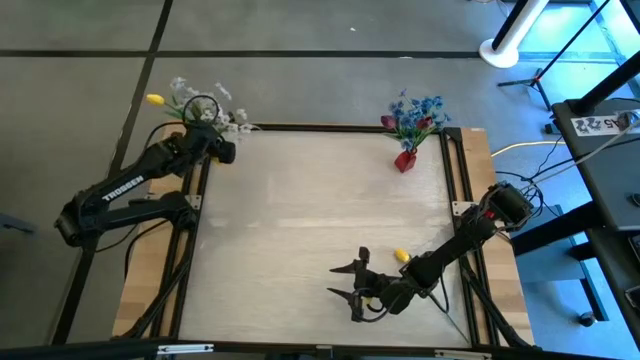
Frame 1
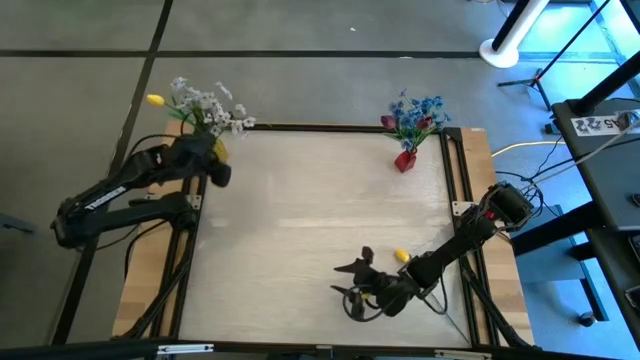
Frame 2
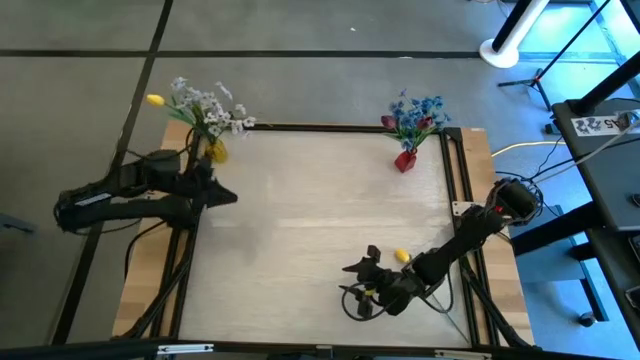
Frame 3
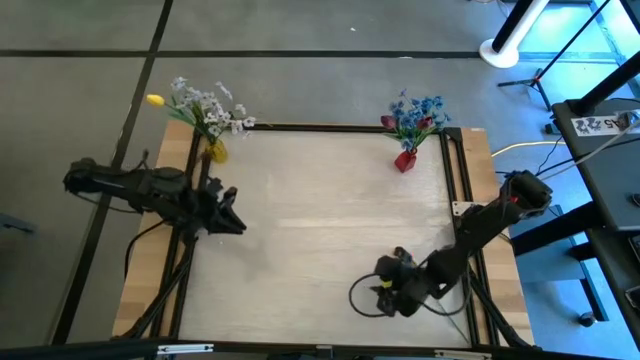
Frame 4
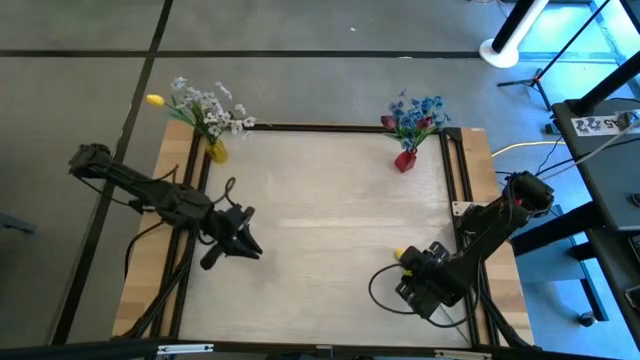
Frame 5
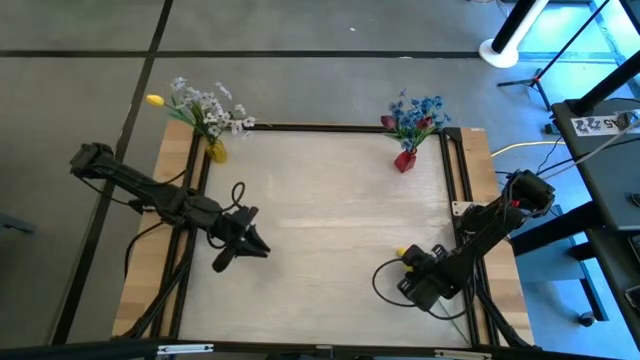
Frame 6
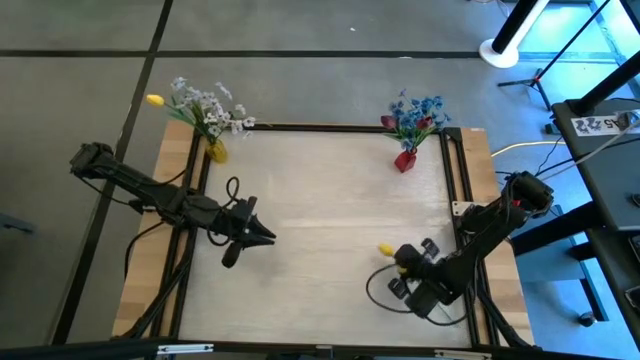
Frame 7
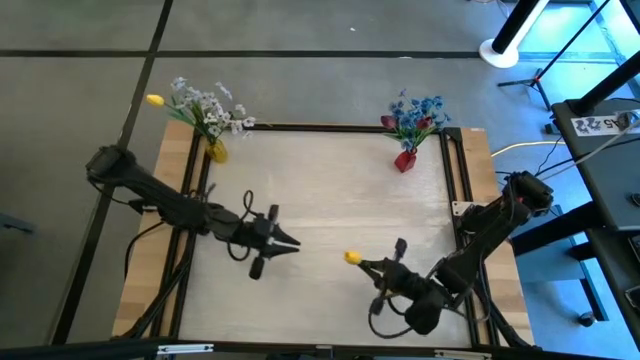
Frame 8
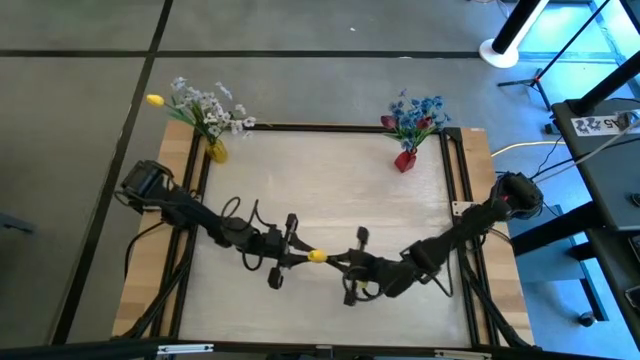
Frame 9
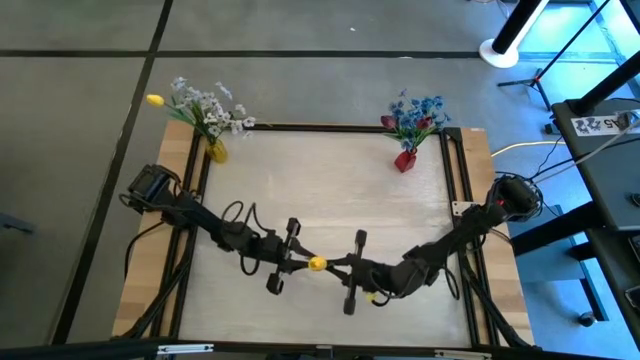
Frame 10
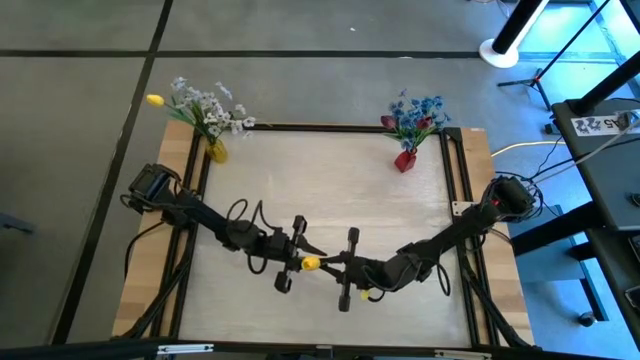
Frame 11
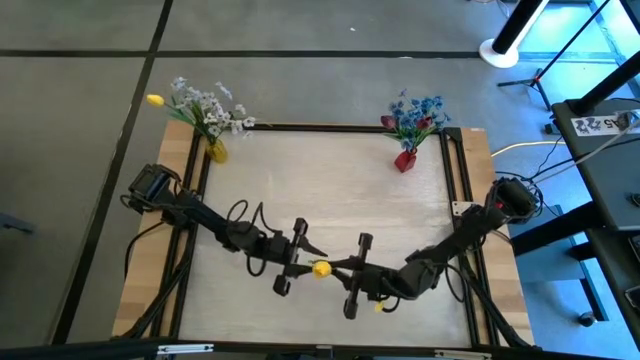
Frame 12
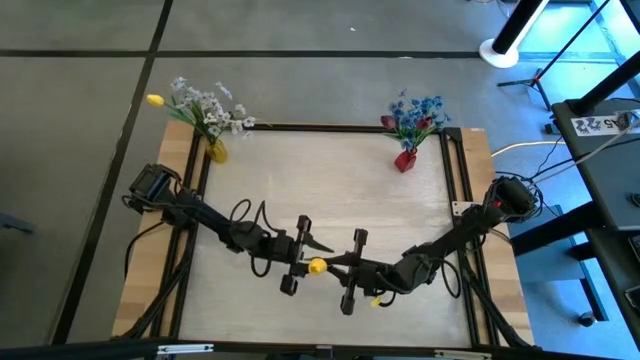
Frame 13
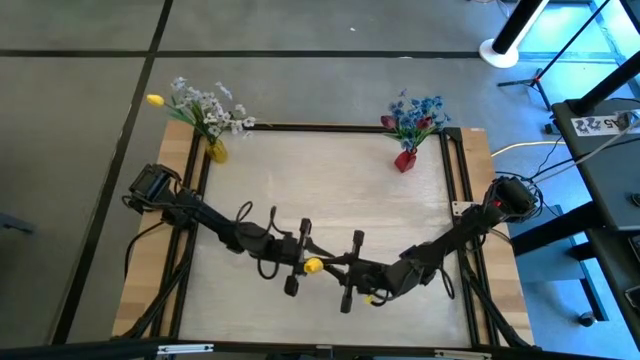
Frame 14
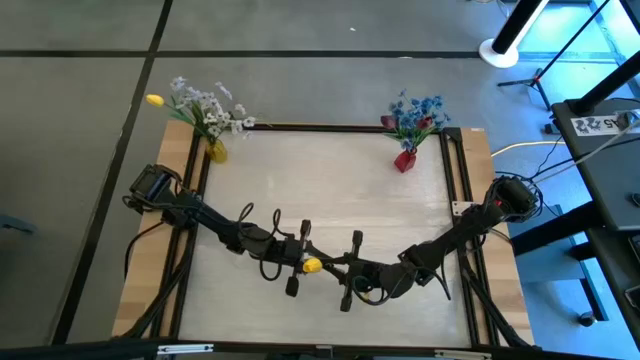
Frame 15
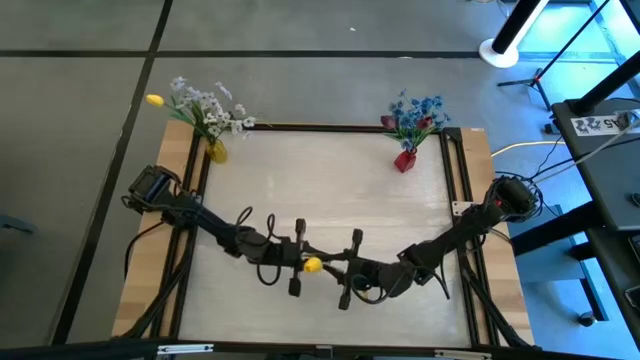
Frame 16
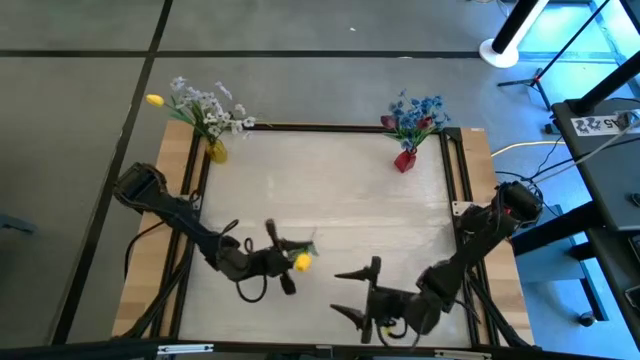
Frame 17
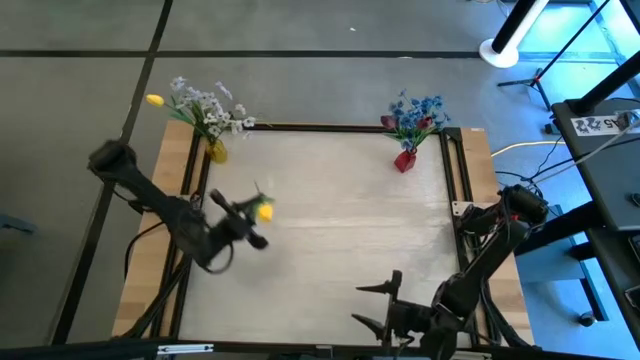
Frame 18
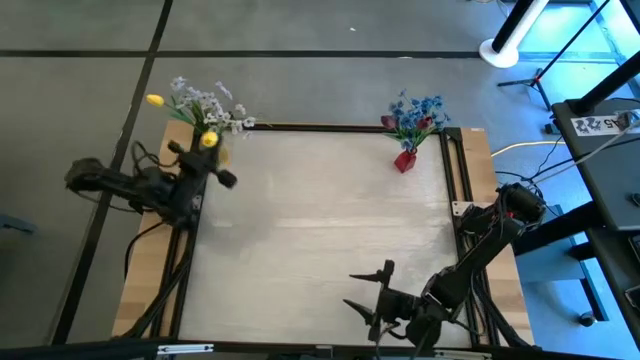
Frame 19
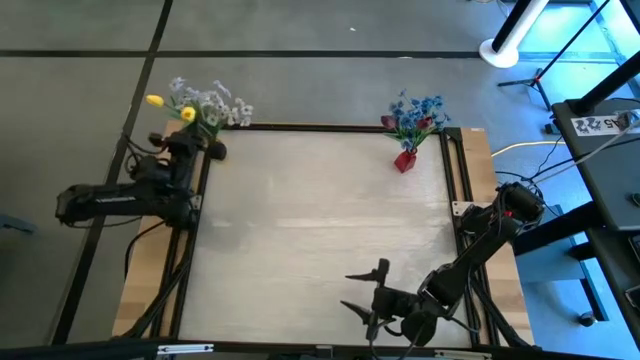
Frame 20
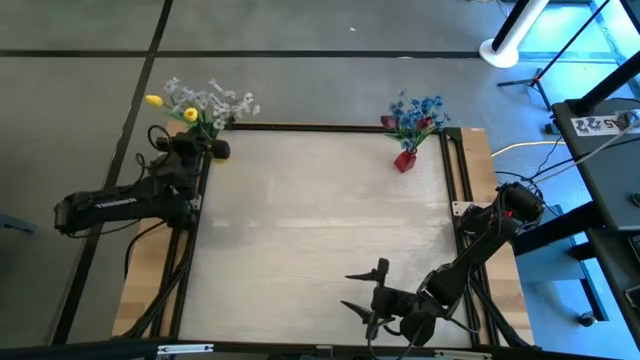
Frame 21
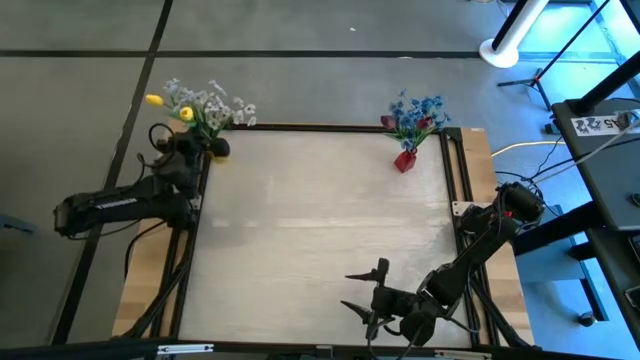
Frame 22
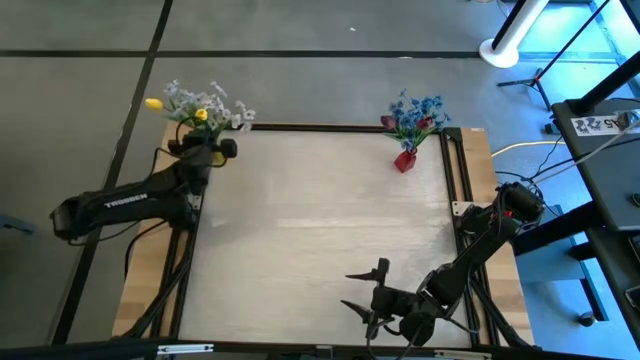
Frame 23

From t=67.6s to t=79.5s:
Task: Sort flowers into vase by color
Put the yellow flower into the yellow vase

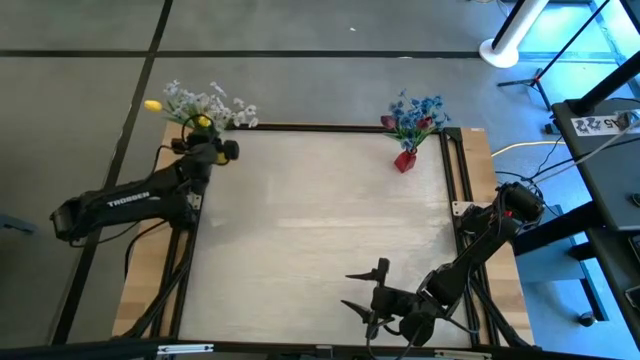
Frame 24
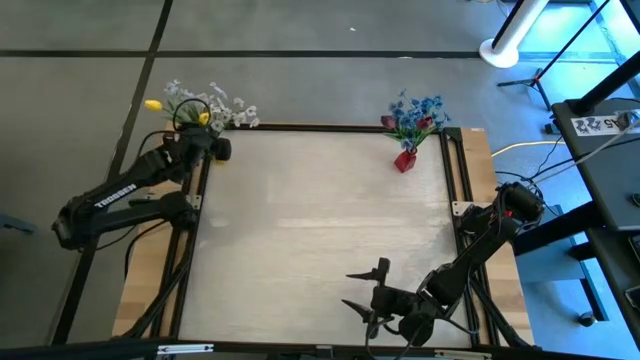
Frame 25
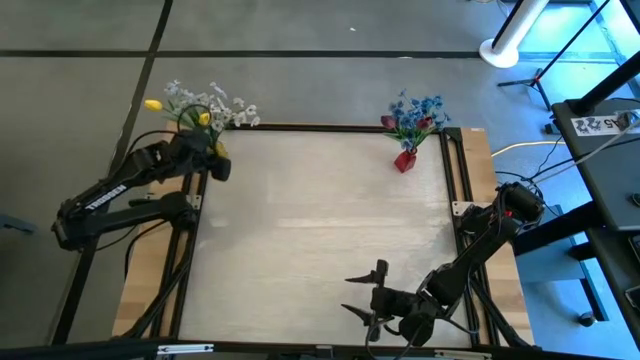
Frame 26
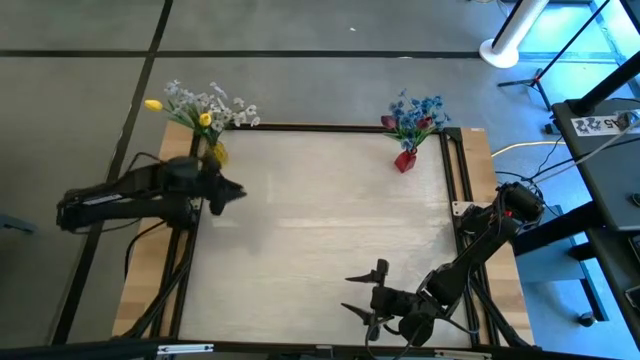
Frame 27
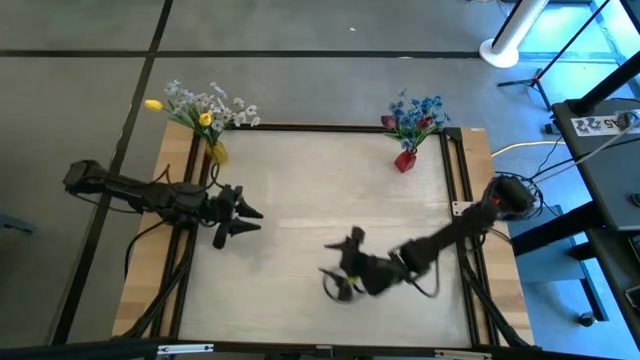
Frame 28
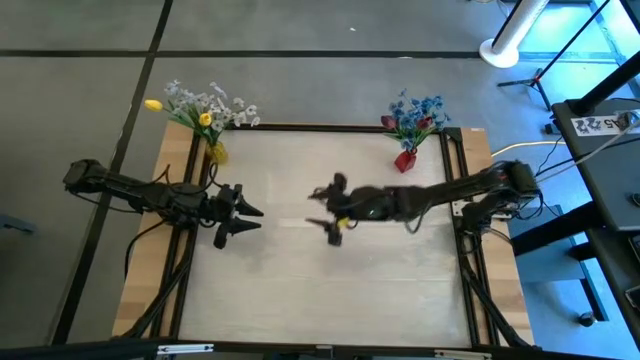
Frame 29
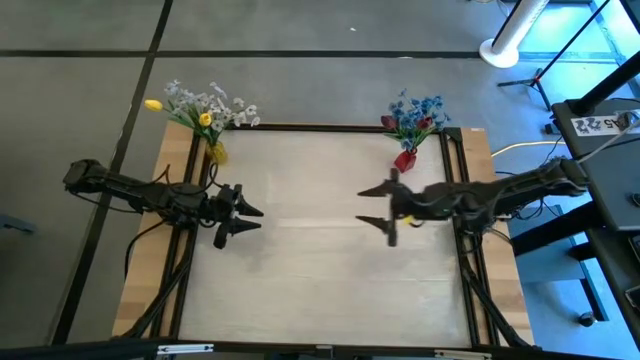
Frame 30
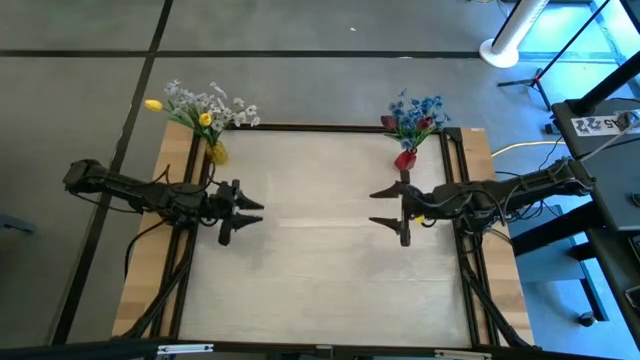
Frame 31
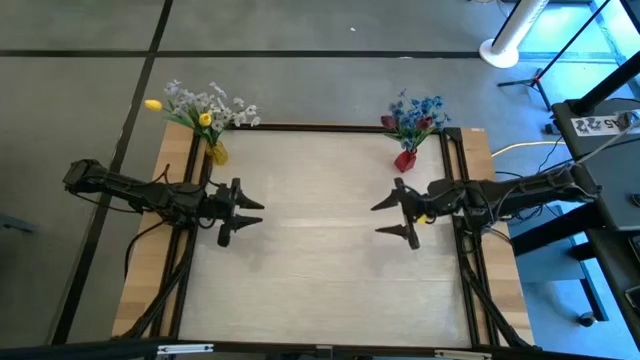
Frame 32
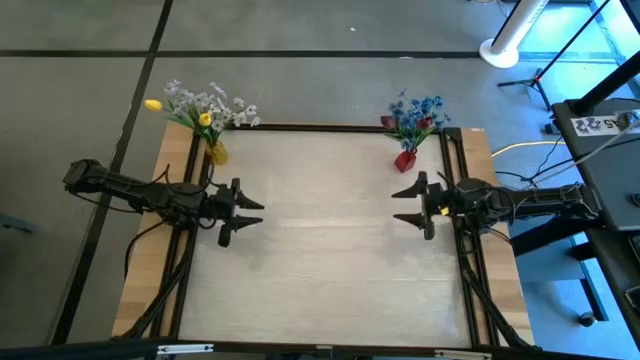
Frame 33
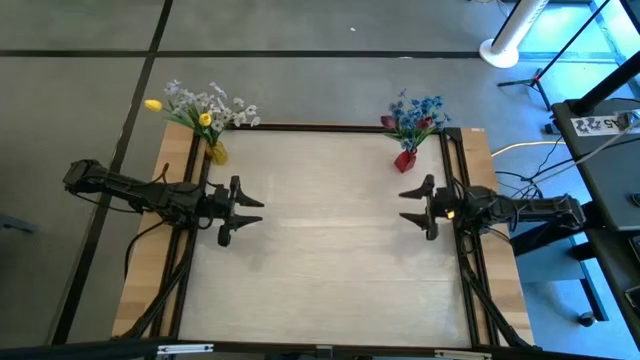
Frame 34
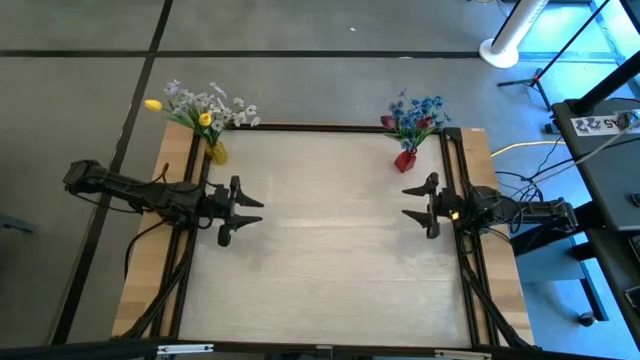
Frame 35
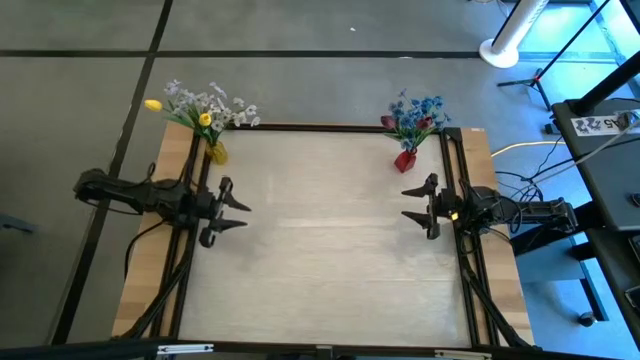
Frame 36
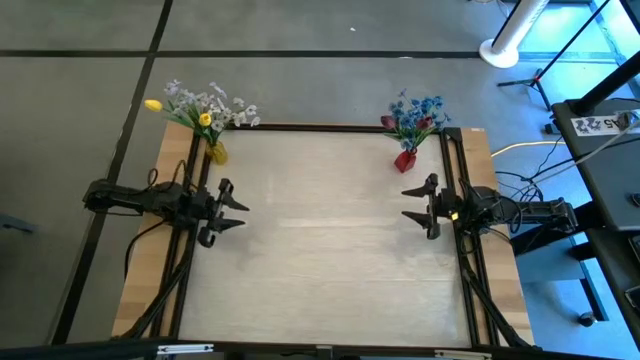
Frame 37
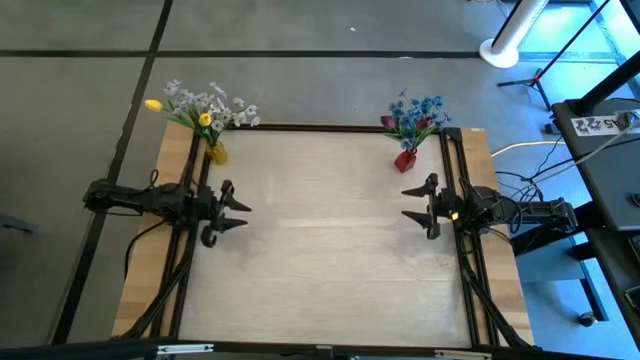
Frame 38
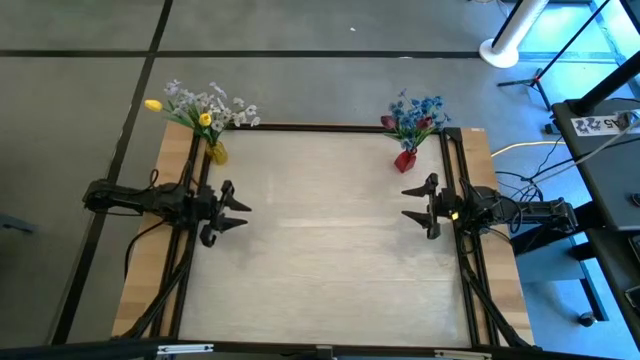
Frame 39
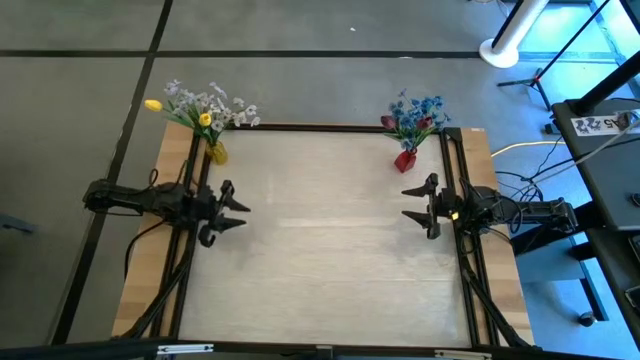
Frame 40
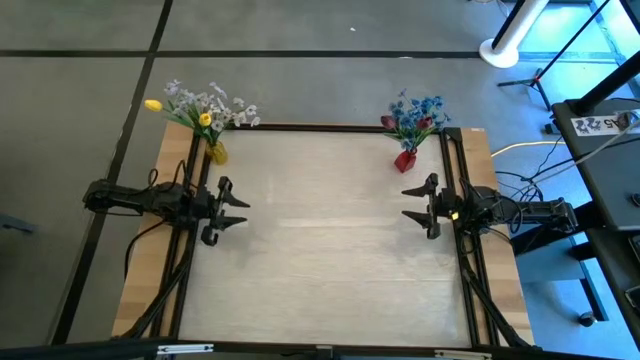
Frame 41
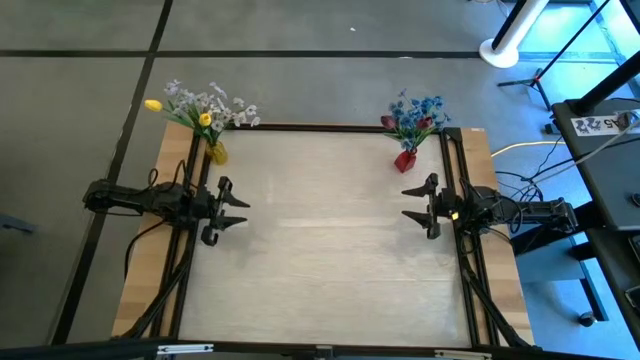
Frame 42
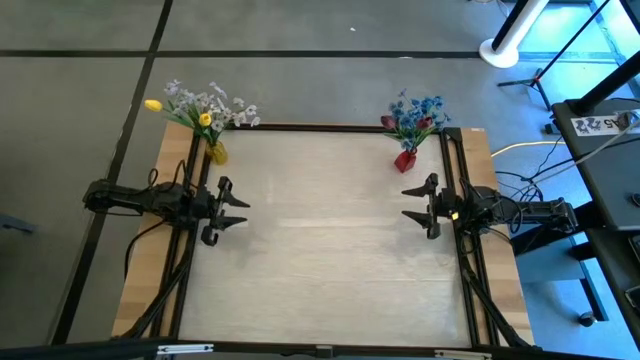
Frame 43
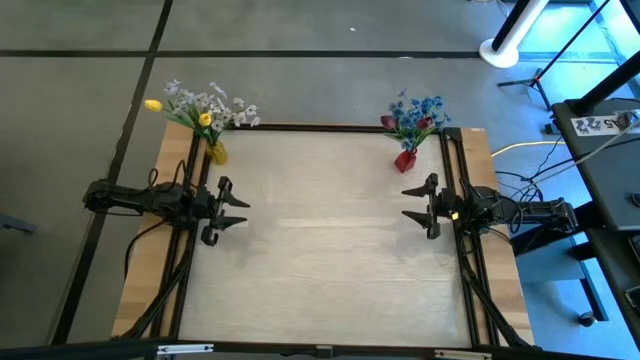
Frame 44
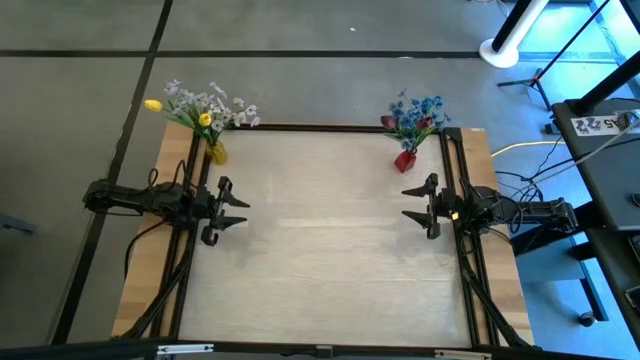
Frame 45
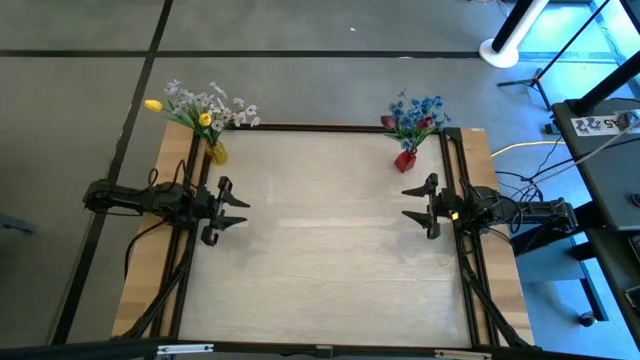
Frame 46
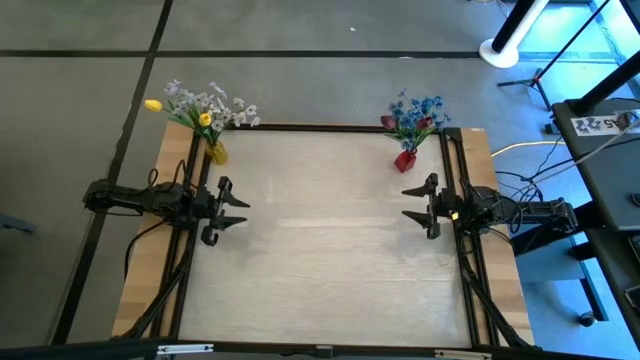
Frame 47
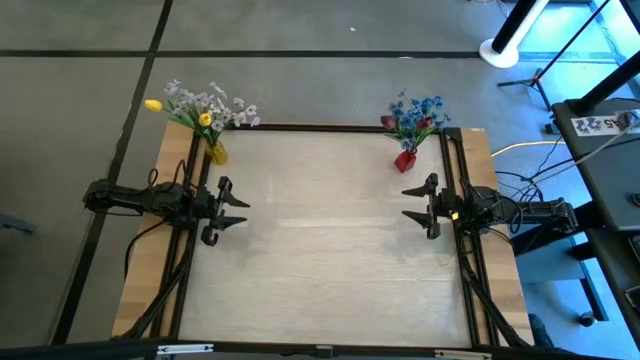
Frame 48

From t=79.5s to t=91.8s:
Return to Home Position
